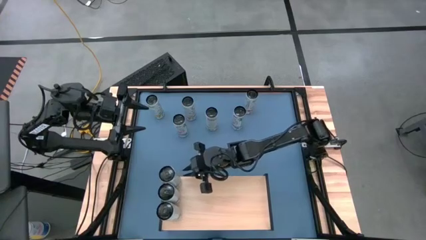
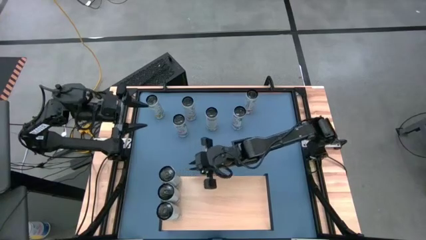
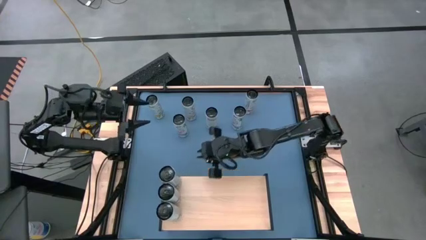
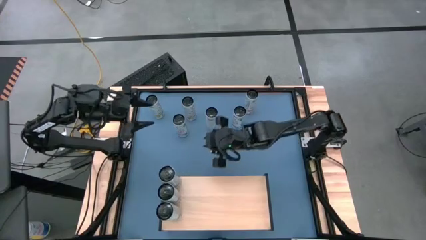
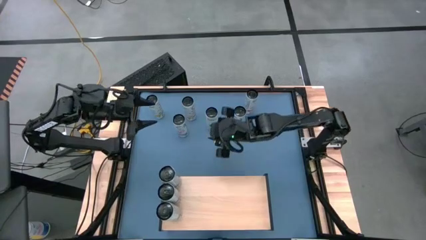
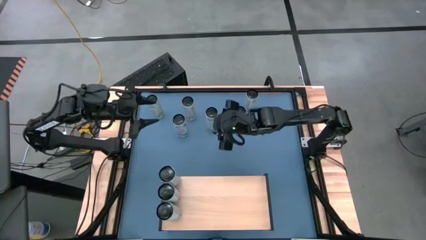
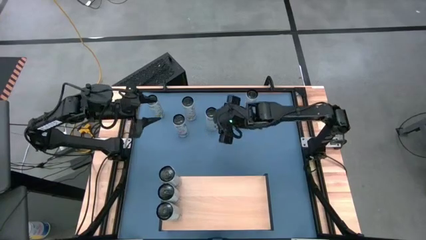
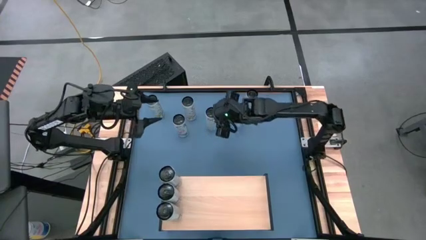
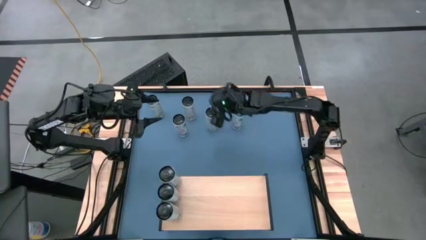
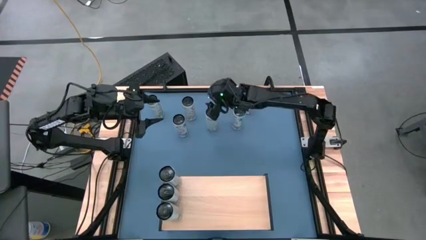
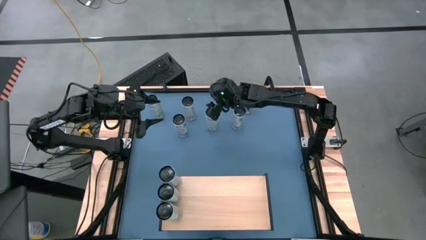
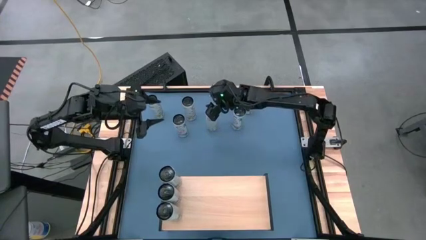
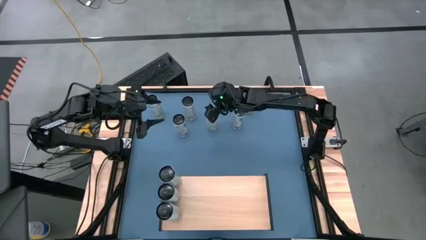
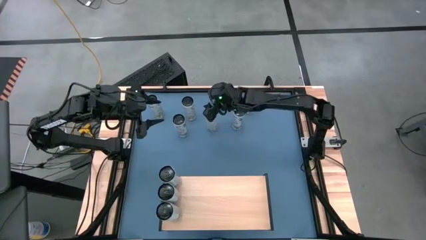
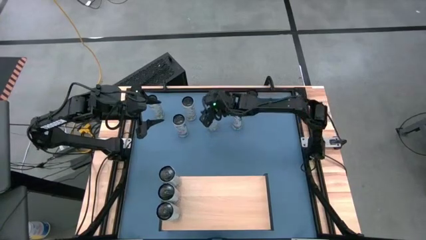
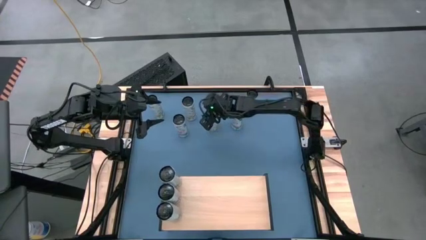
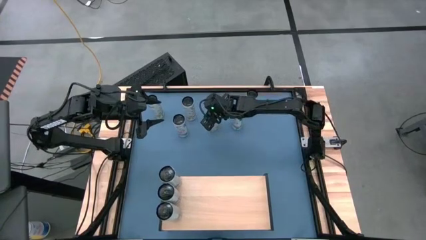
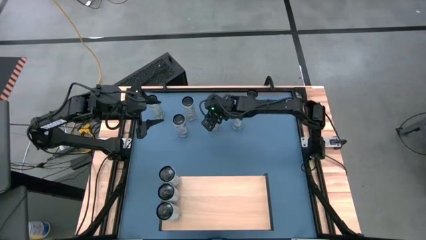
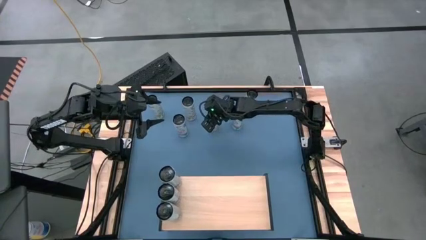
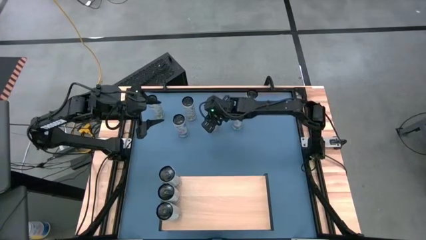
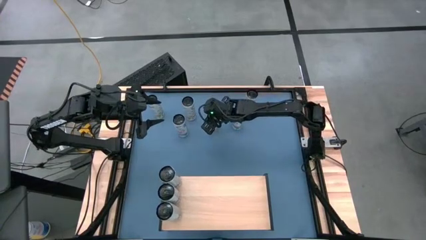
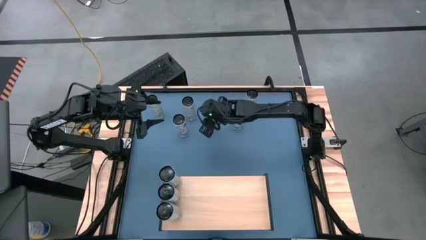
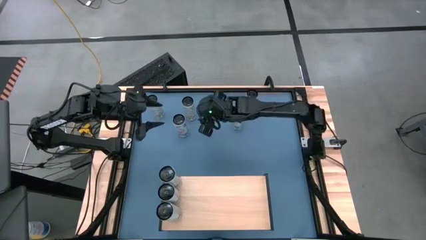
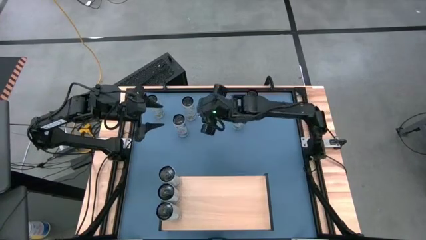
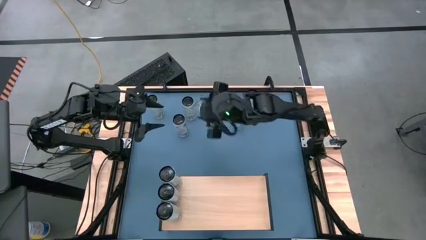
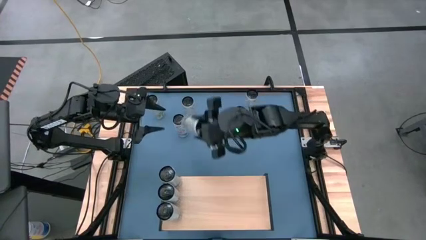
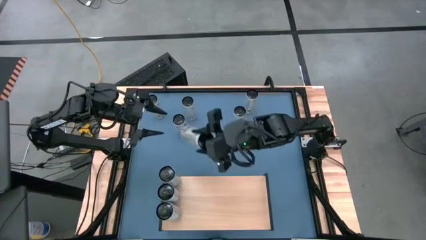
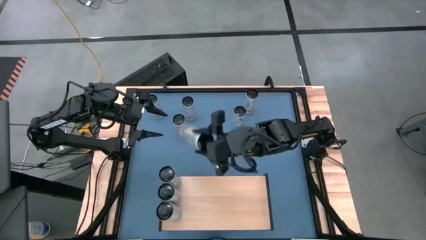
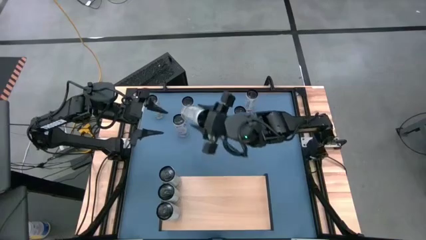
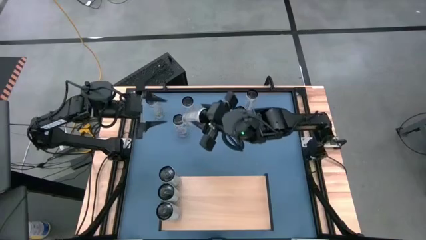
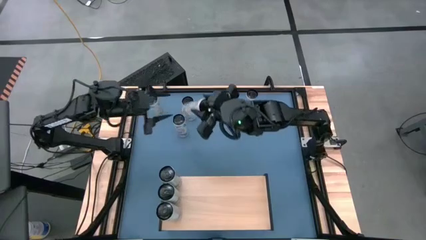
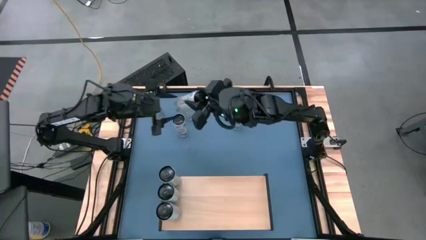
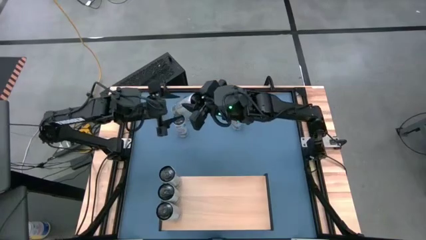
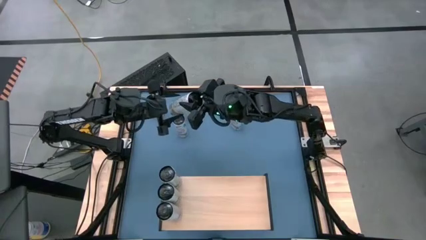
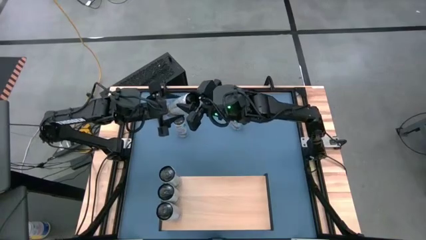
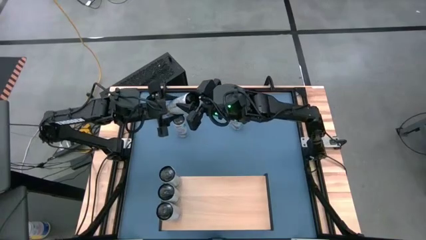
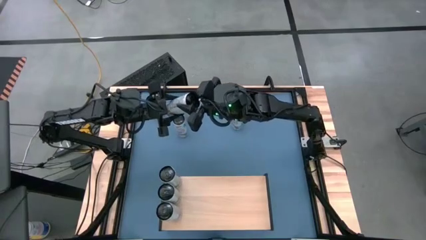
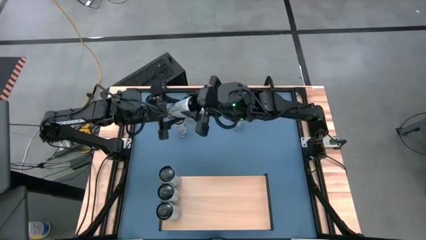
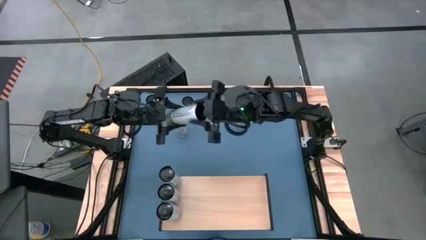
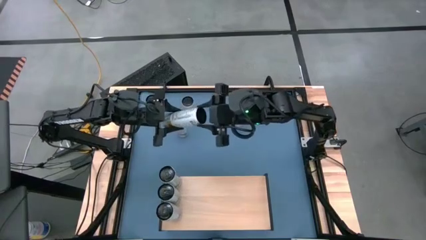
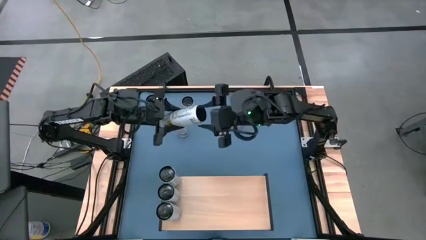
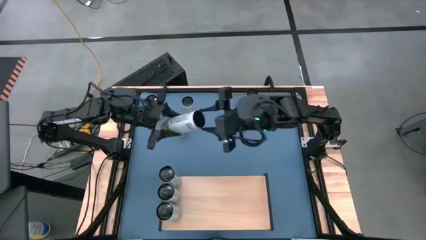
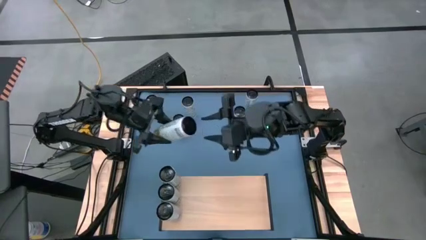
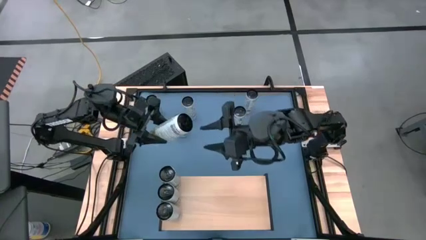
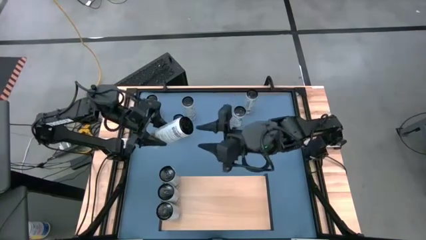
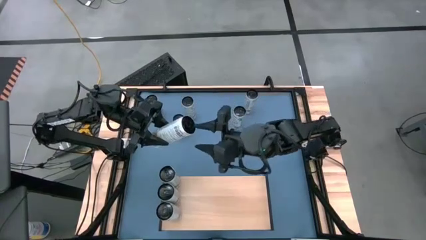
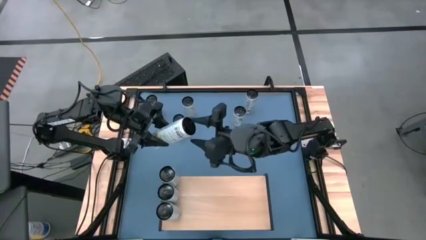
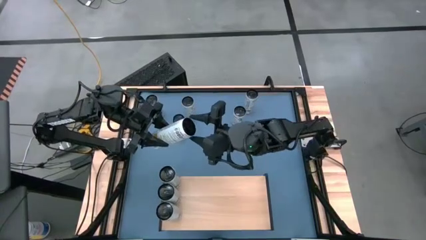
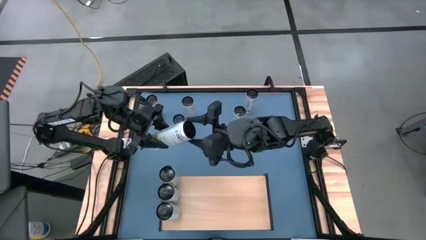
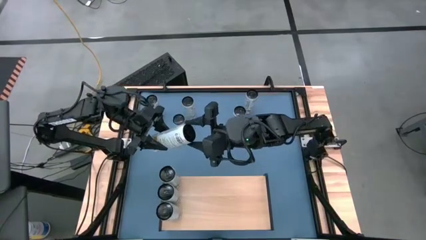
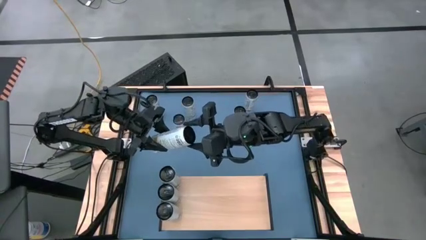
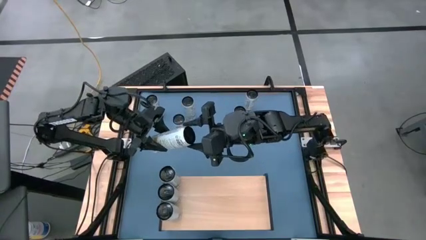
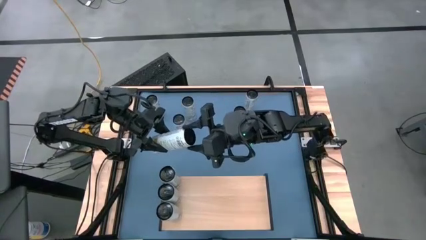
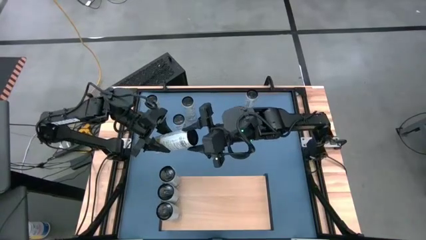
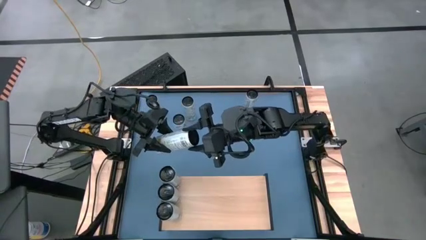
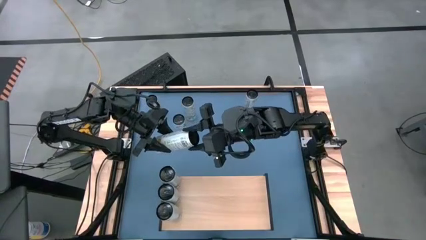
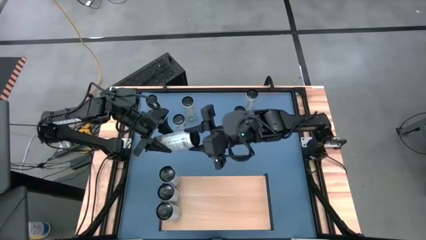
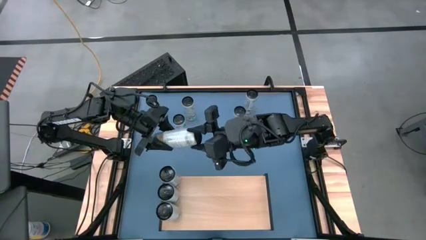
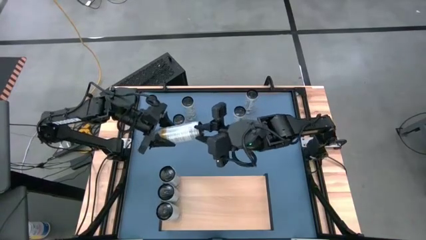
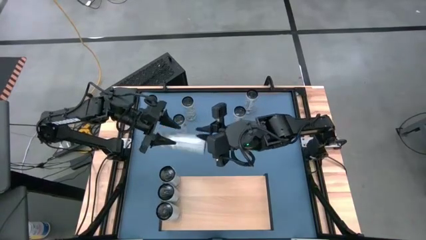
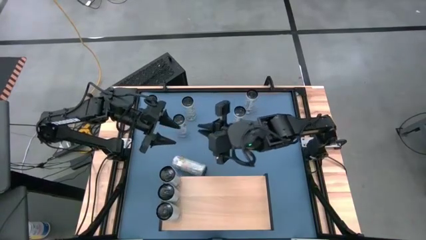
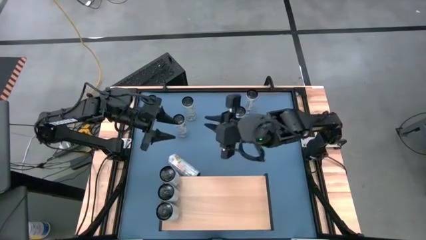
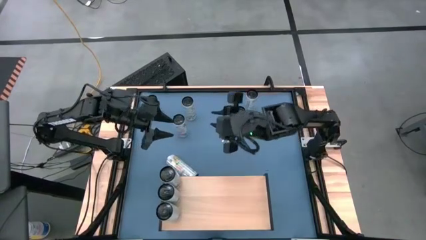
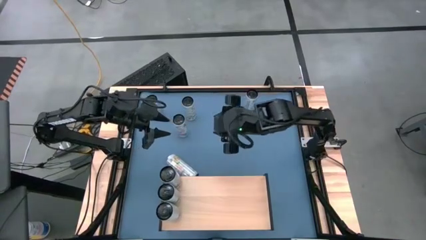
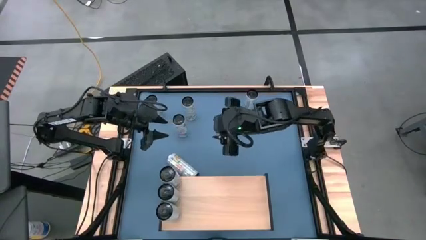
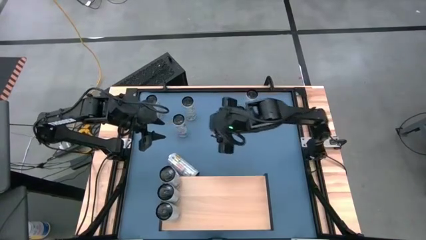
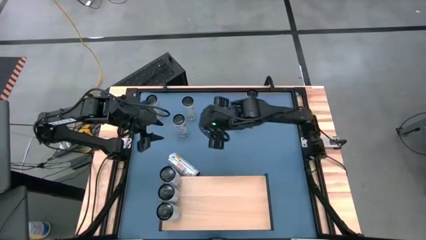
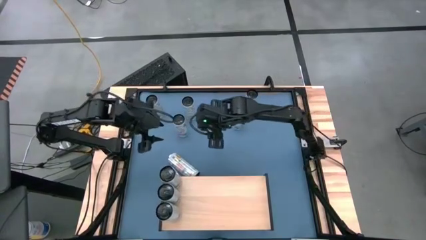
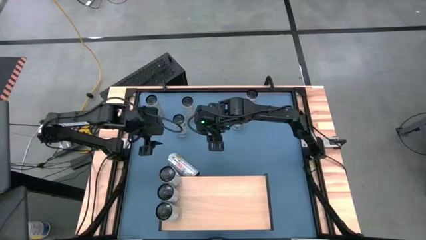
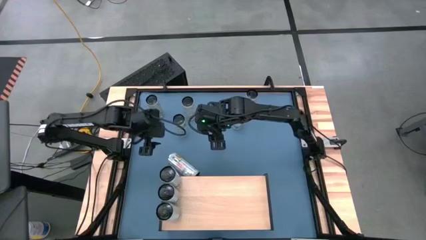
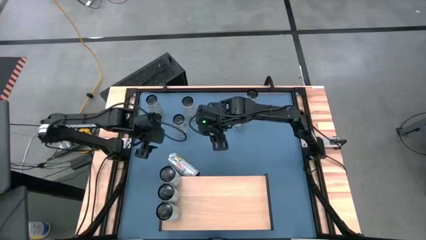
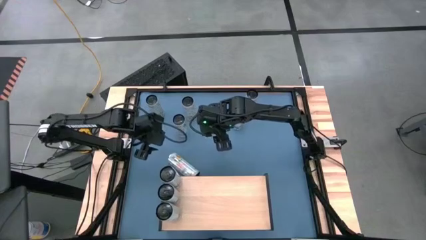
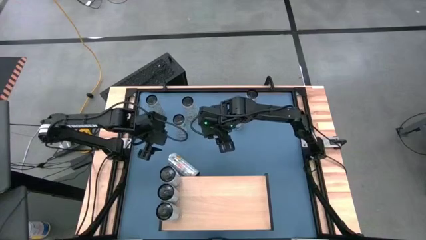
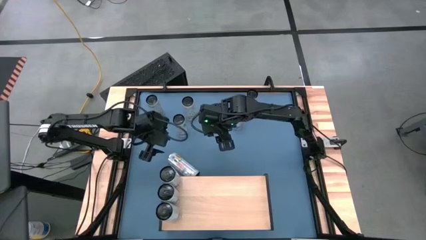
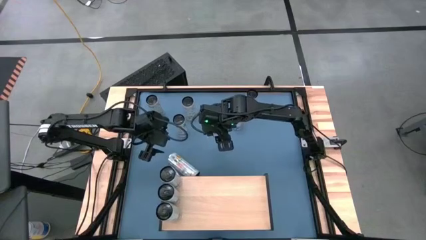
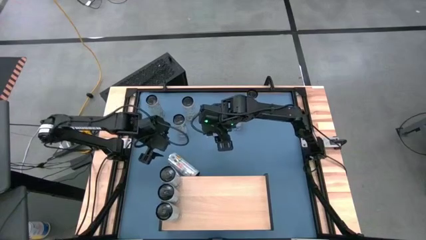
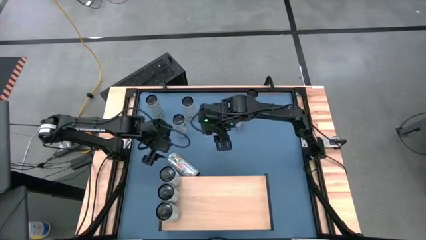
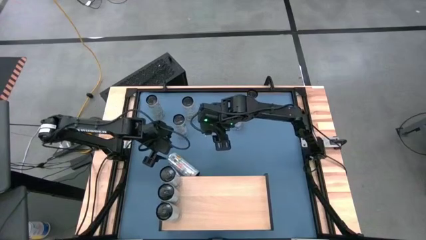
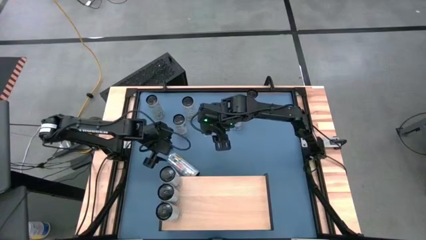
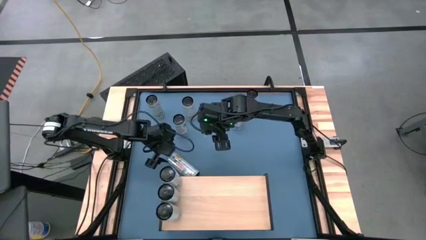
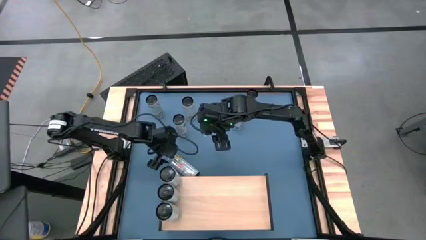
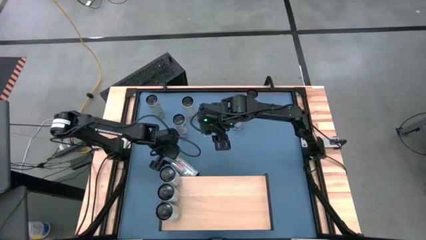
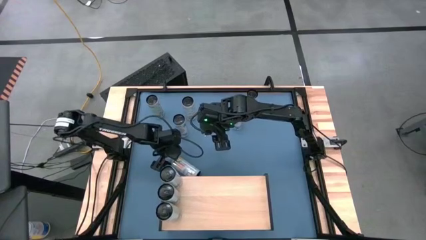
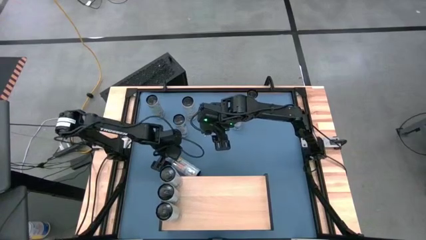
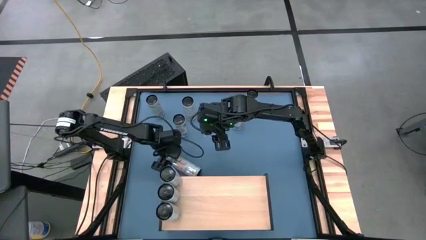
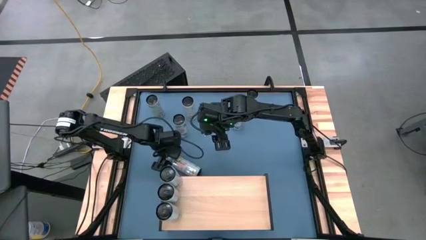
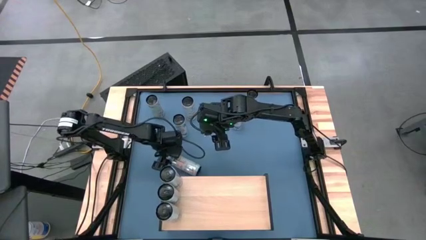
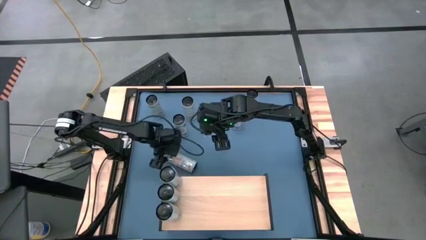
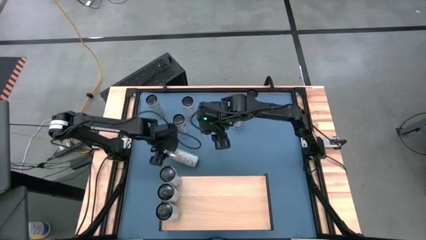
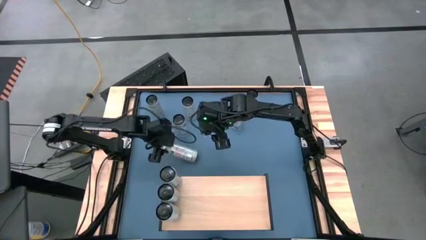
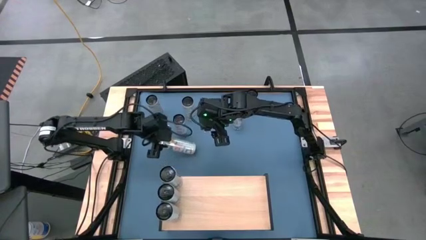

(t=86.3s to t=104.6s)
Task: Place canned beverage on shelf
Put the bottom right white yellow soda can on the shelf
